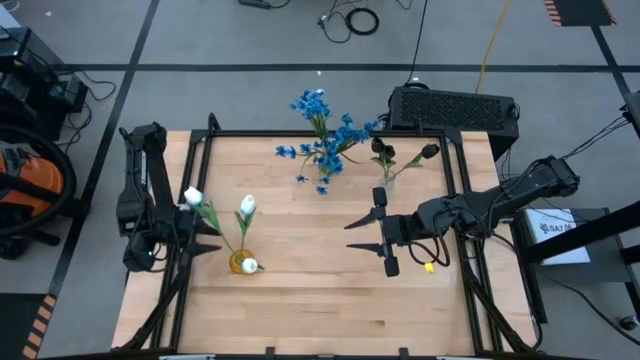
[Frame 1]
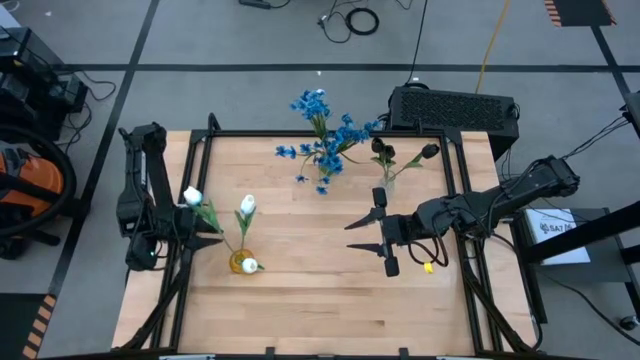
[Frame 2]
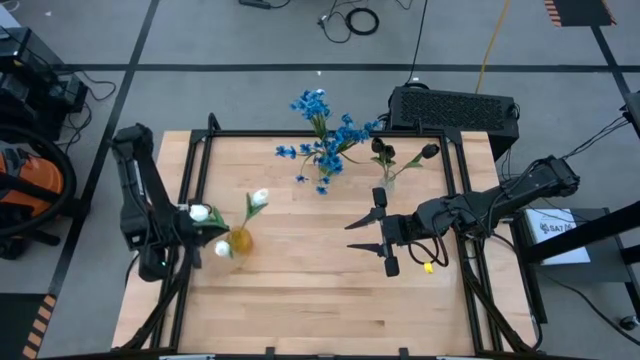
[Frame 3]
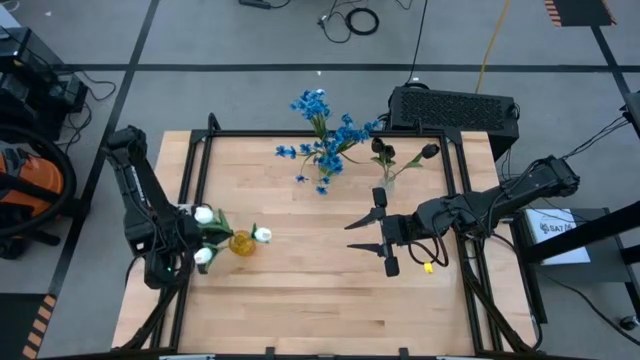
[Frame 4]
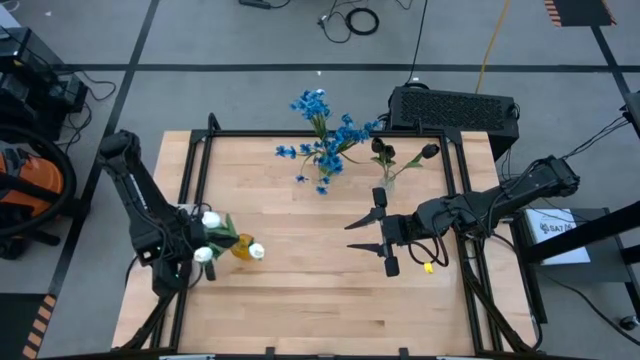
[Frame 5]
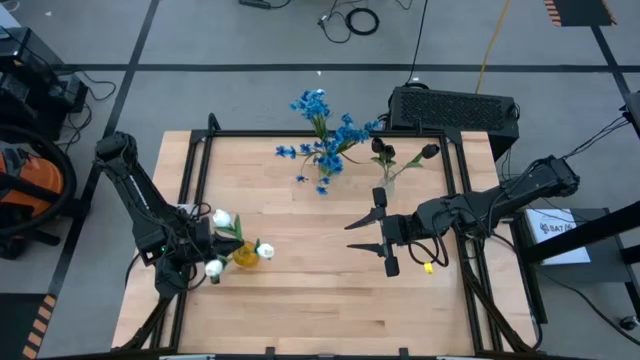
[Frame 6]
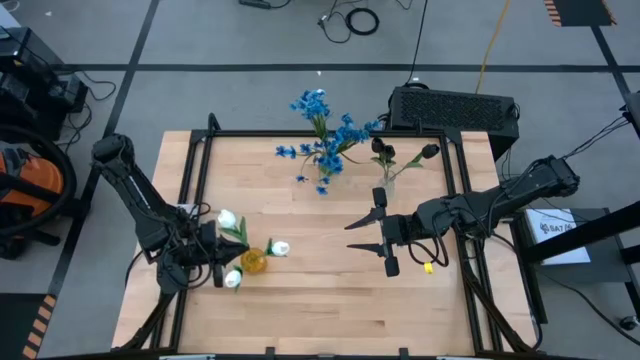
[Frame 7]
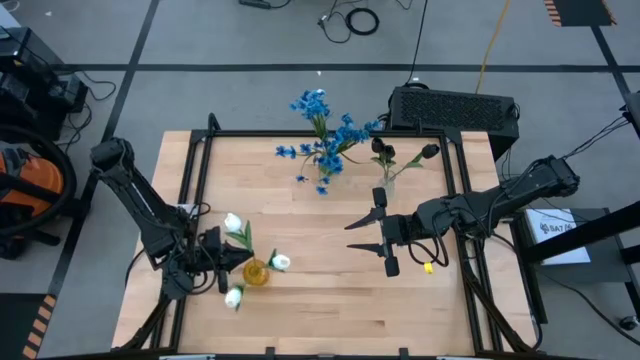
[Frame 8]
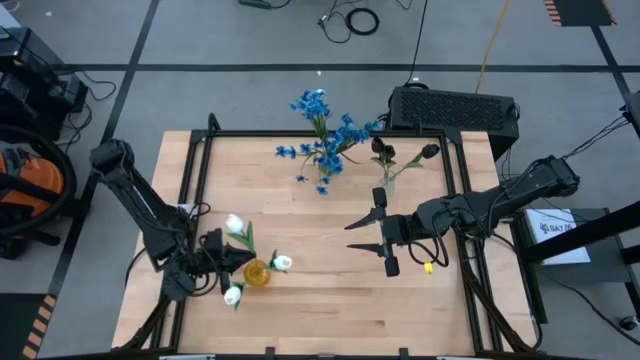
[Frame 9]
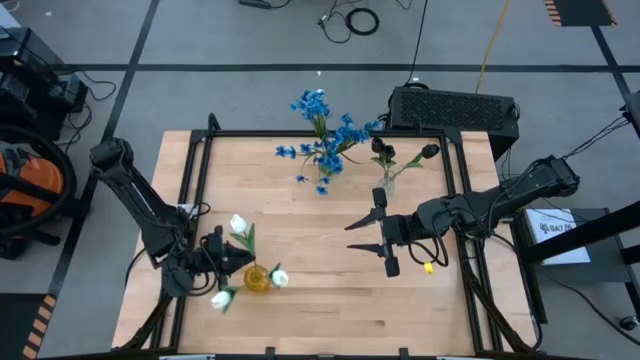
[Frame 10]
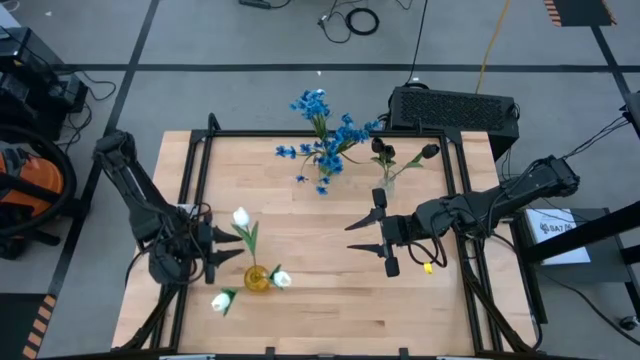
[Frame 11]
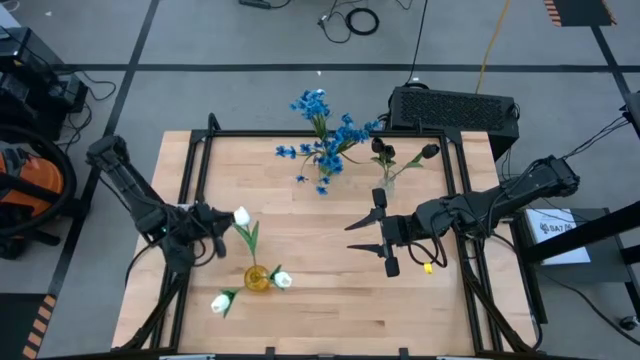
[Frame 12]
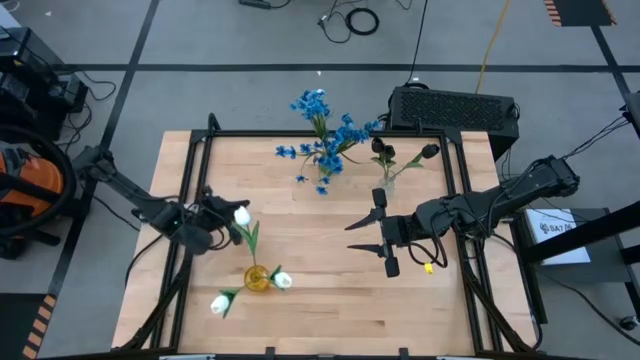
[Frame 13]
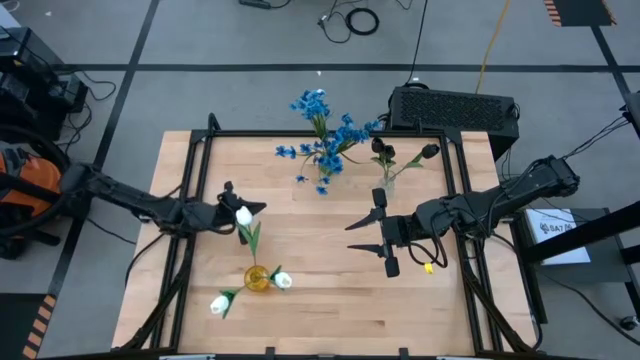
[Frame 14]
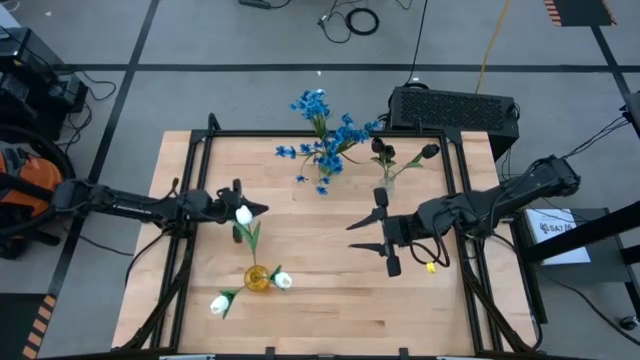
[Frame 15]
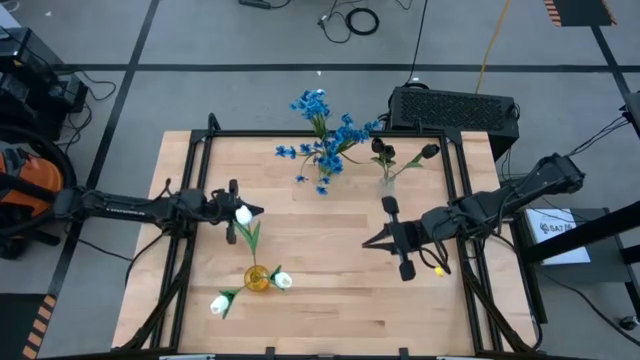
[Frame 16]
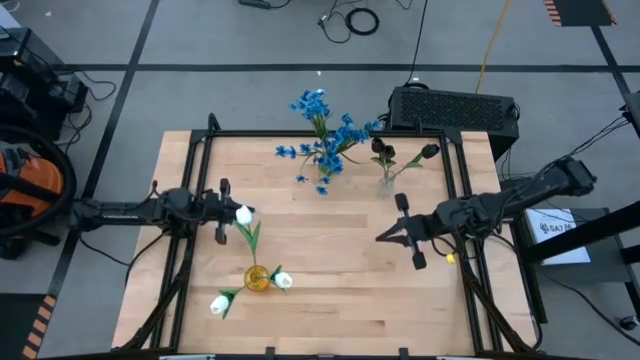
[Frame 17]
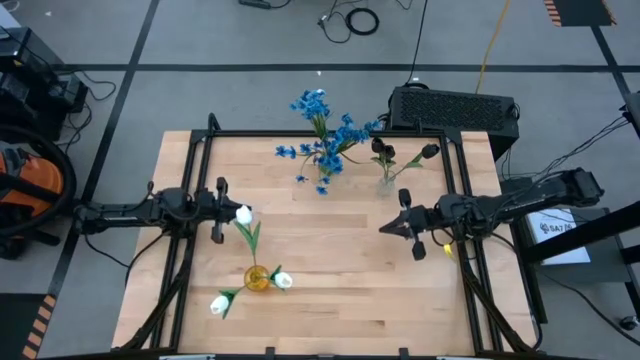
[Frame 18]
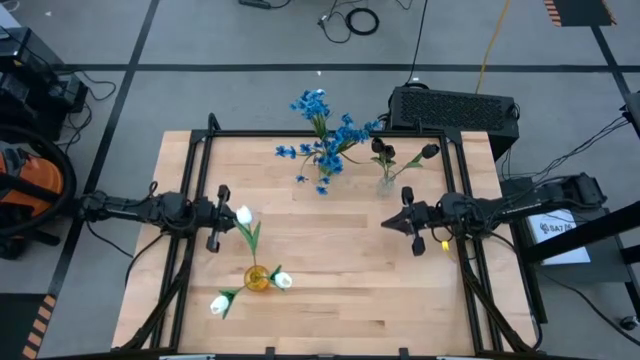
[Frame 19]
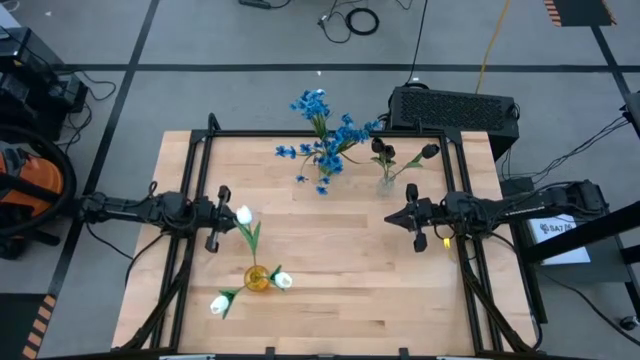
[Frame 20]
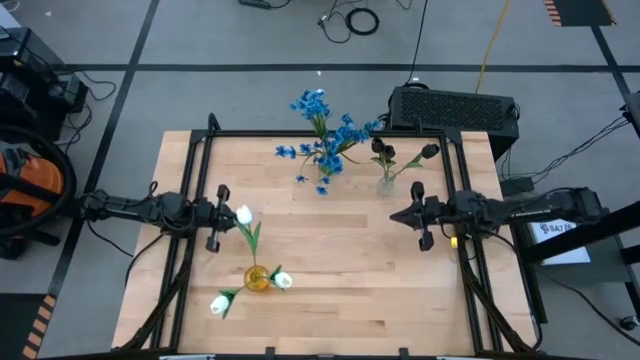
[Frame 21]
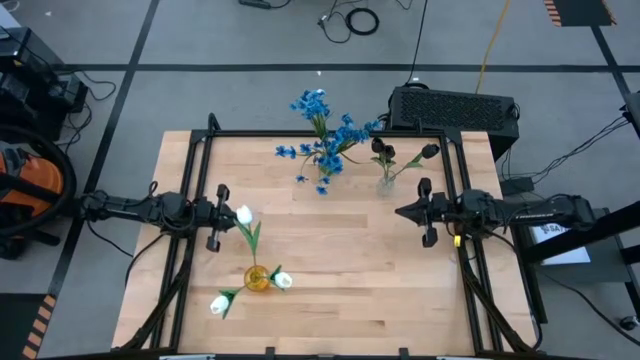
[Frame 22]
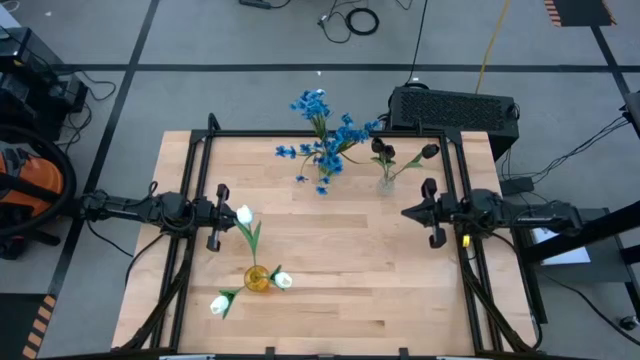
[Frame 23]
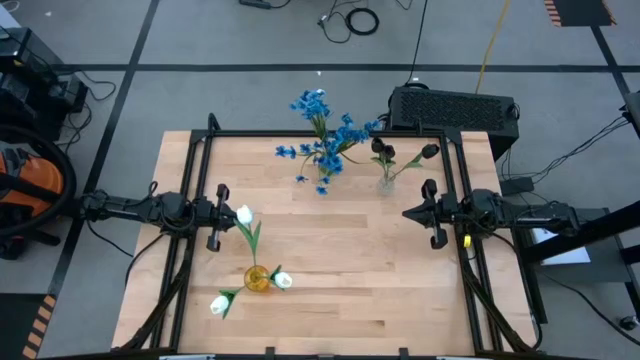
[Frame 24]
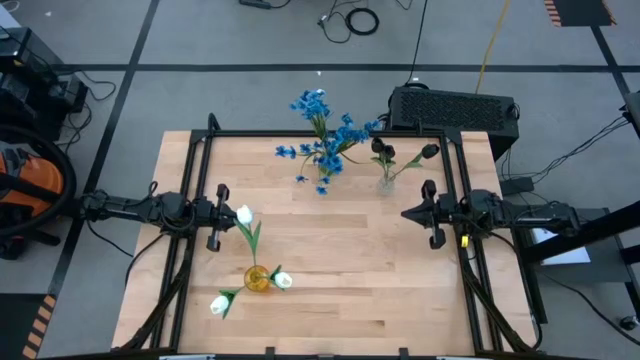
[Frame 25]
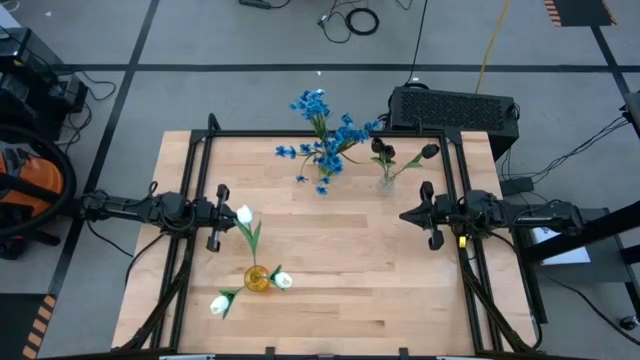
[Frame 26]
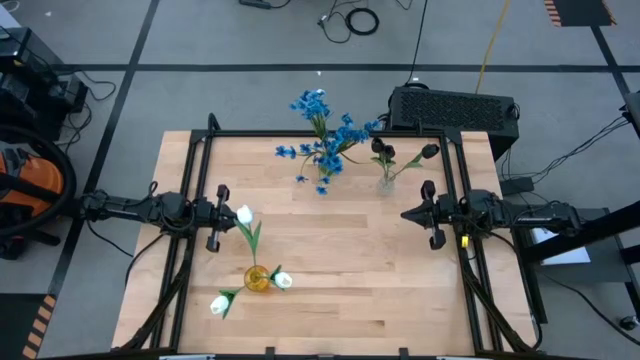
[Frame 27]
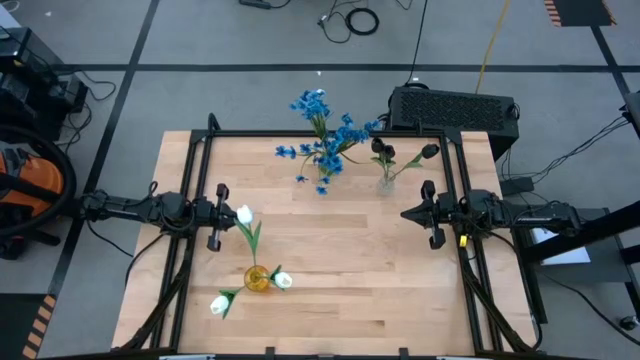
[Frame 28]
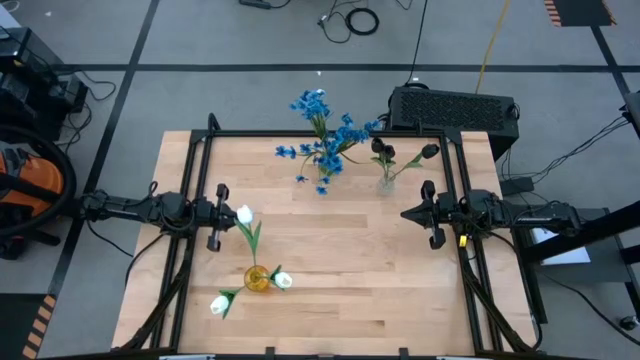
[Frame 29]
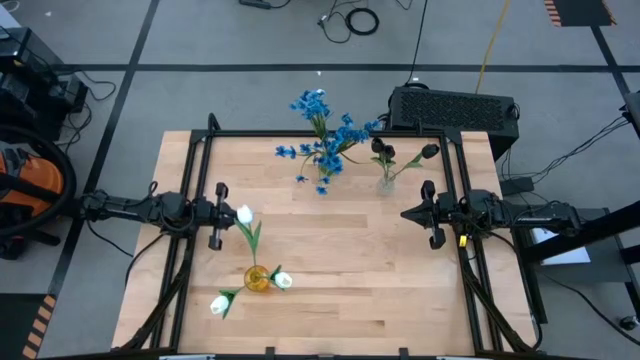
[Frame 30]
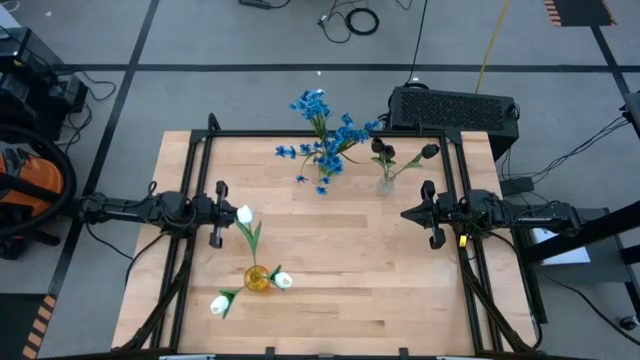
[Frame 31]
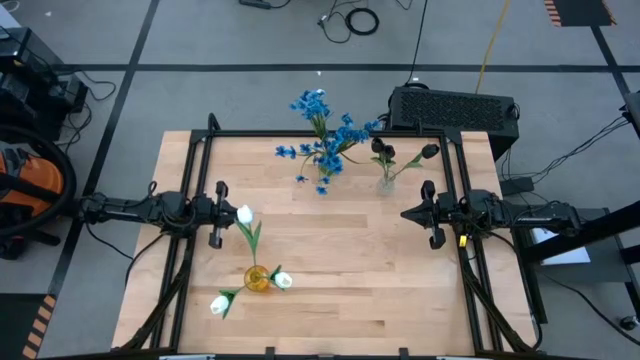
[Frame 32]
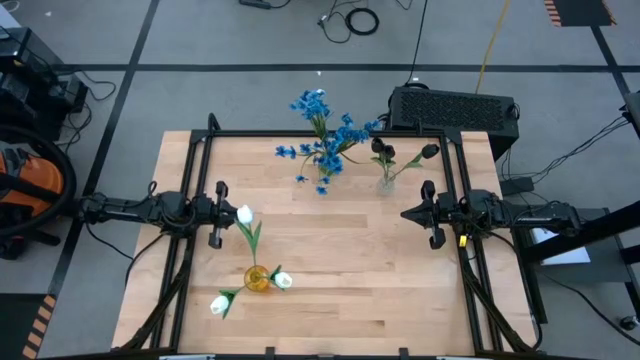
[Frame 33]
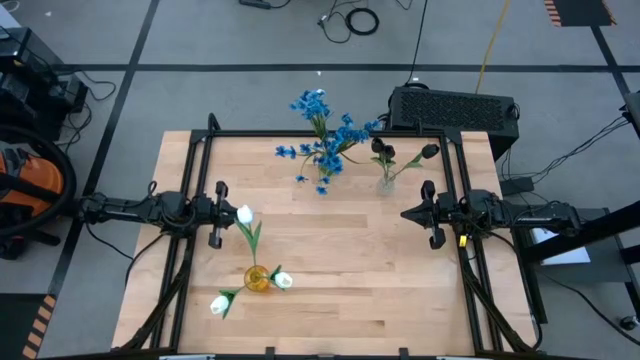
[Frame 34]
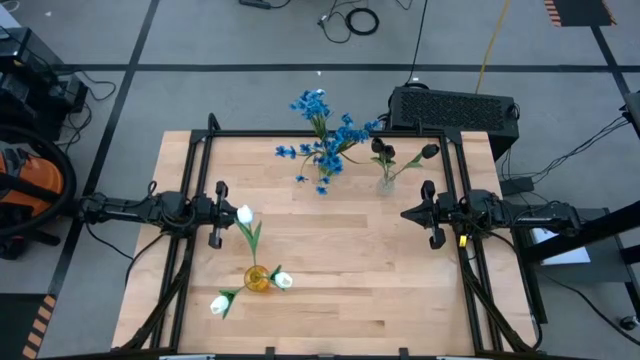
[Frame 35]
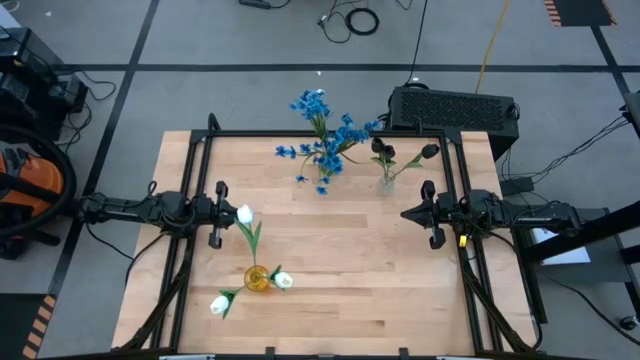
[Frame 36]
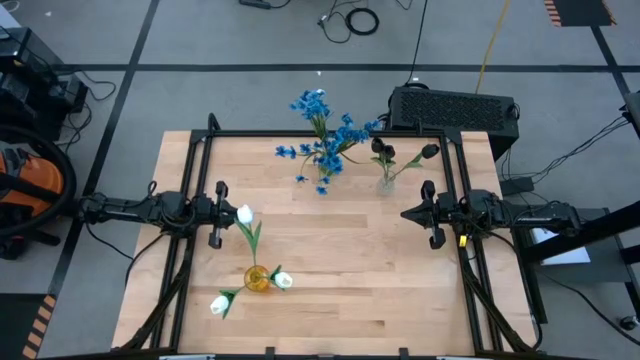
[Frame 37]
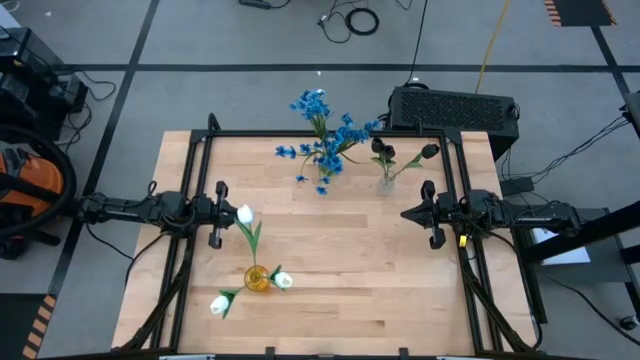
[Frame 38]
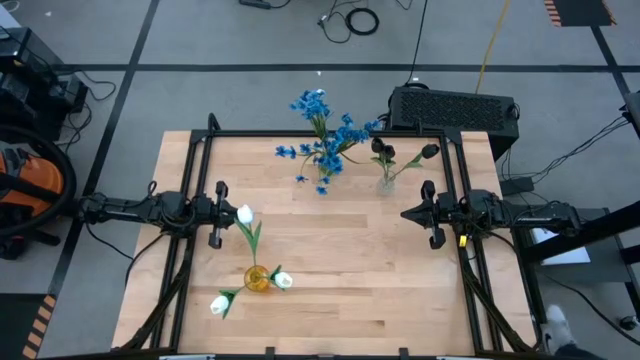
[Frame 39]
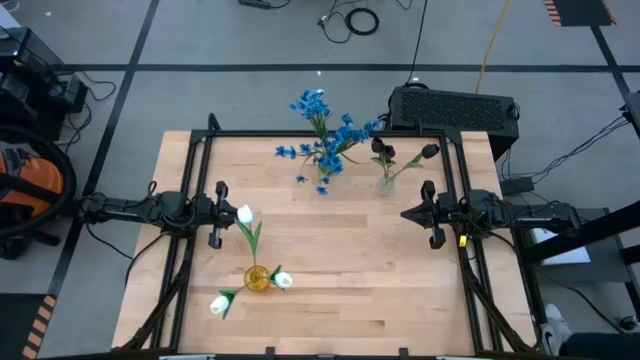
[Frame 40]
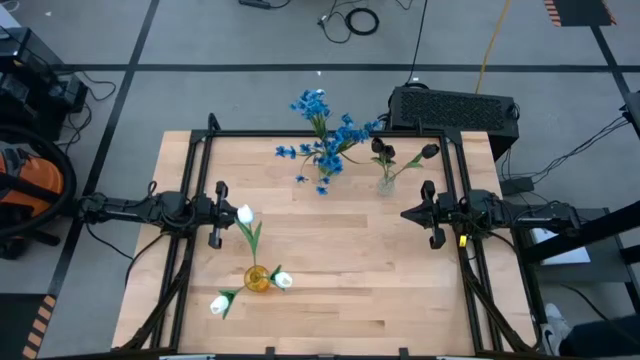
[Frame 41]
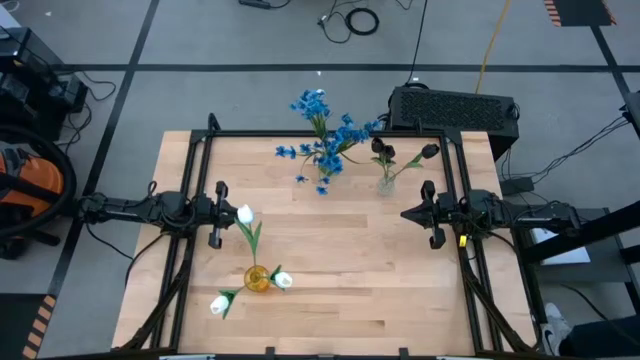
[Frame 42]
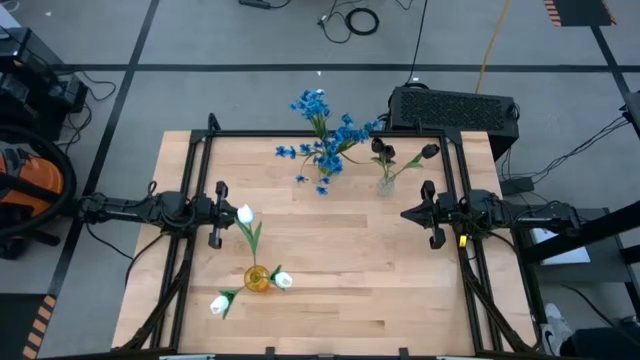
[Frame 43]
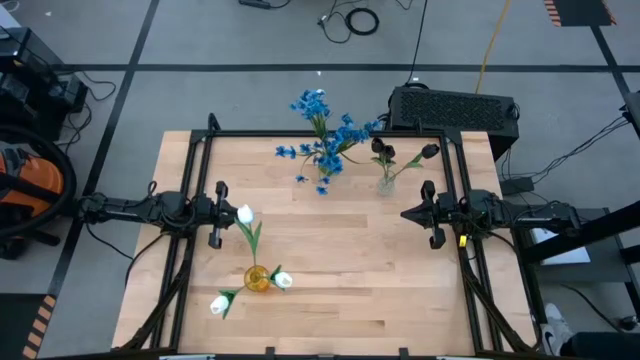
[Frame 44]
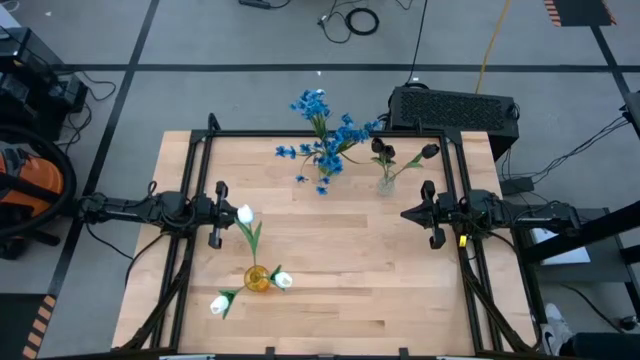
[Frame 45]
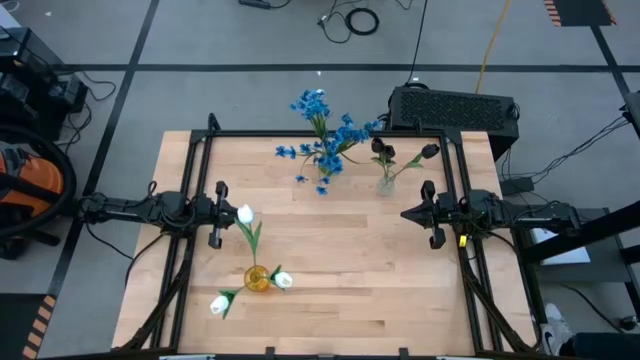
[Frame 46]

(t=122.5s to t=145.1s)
Task: Sort flowers into vase by color
Return to Home Position
